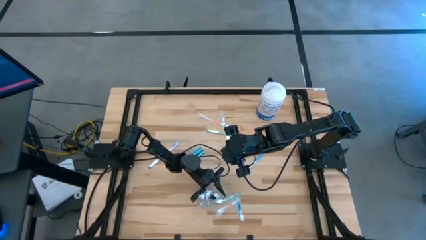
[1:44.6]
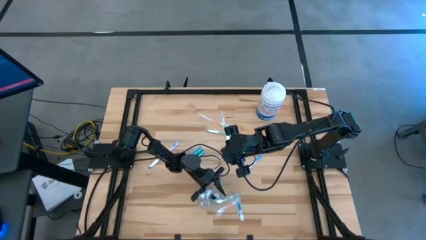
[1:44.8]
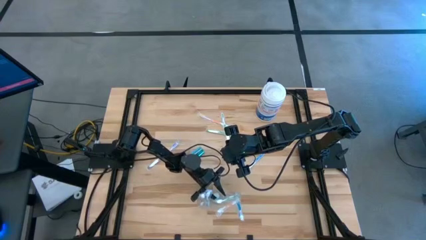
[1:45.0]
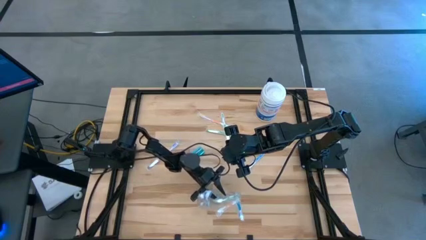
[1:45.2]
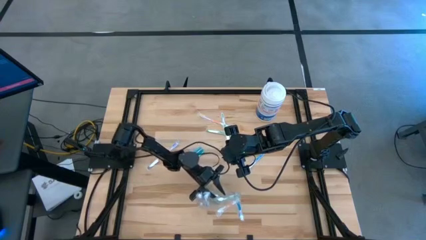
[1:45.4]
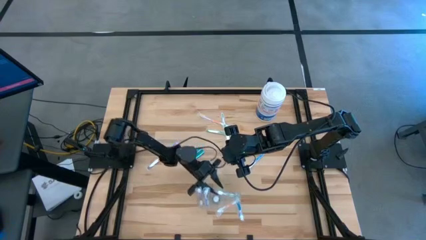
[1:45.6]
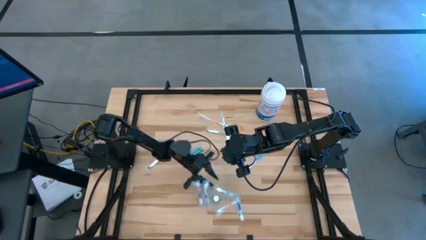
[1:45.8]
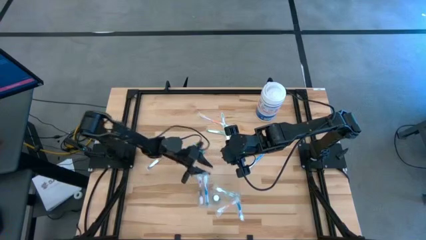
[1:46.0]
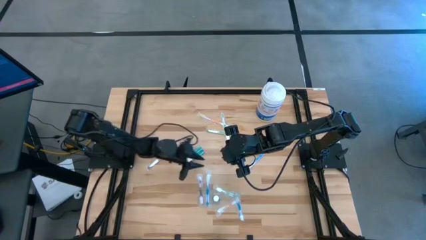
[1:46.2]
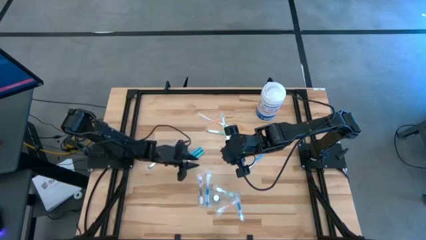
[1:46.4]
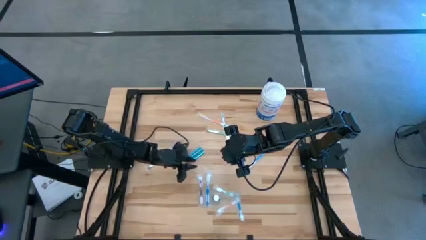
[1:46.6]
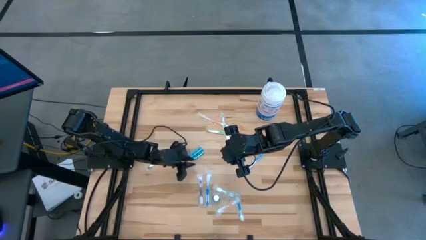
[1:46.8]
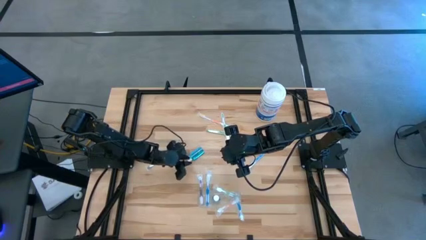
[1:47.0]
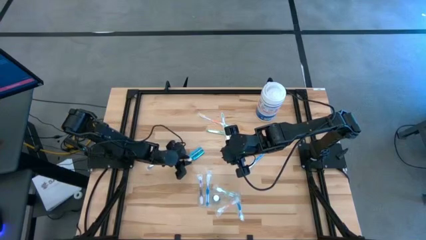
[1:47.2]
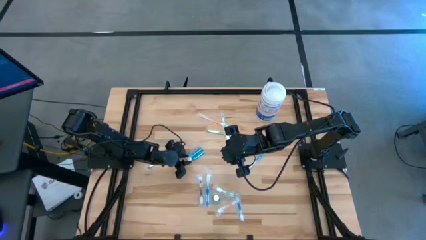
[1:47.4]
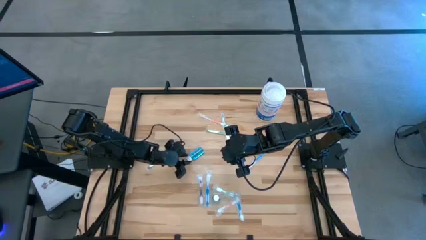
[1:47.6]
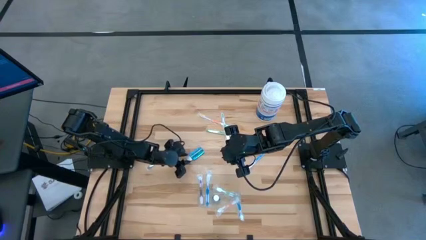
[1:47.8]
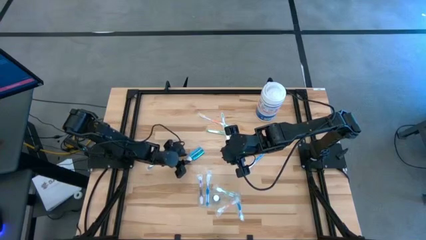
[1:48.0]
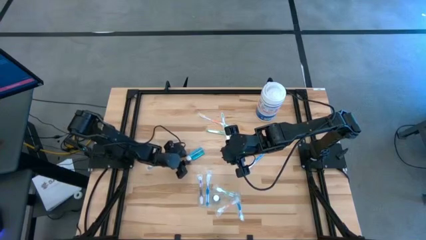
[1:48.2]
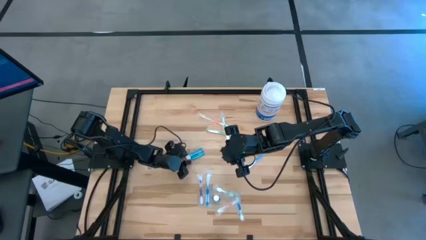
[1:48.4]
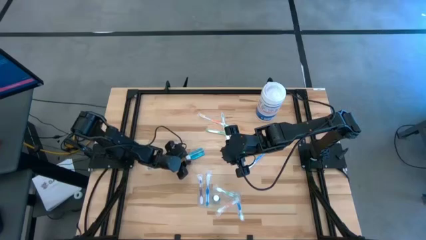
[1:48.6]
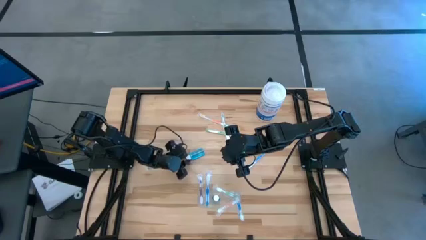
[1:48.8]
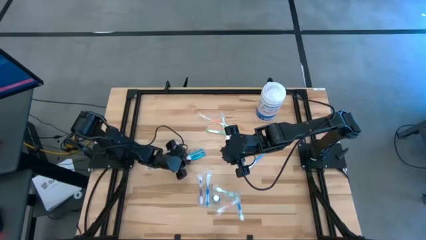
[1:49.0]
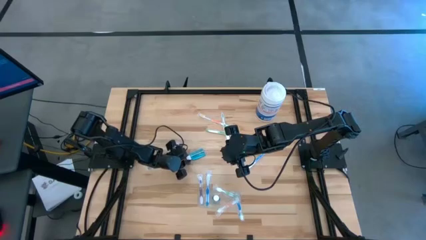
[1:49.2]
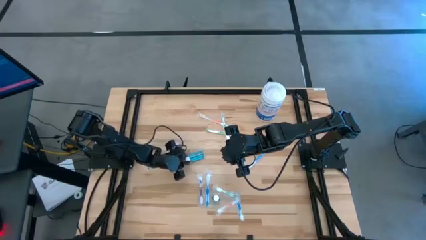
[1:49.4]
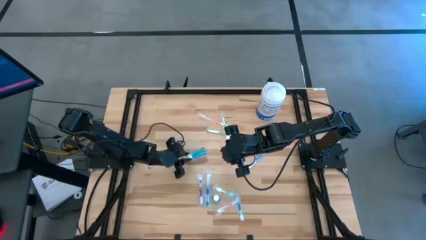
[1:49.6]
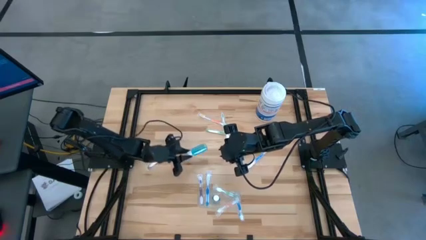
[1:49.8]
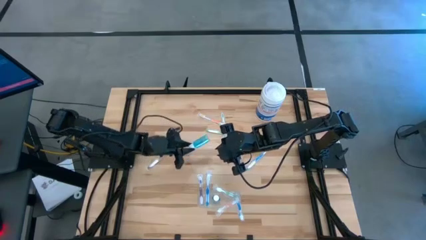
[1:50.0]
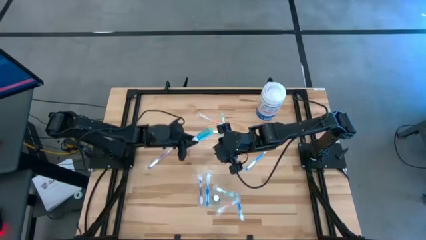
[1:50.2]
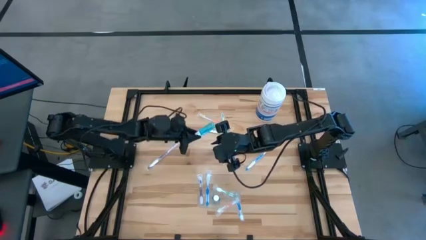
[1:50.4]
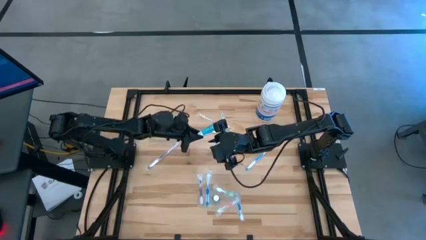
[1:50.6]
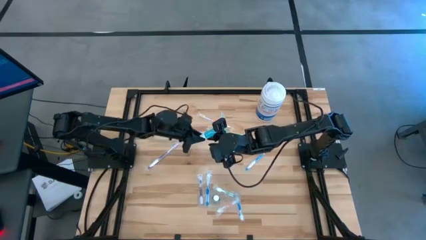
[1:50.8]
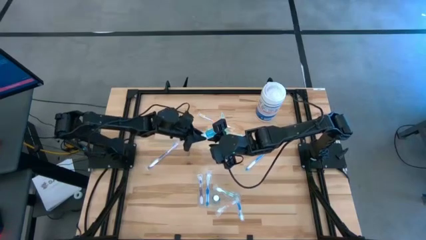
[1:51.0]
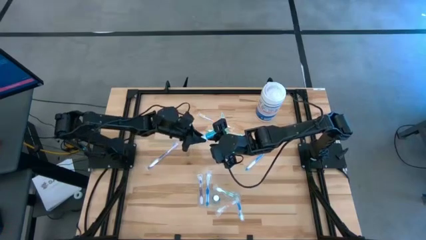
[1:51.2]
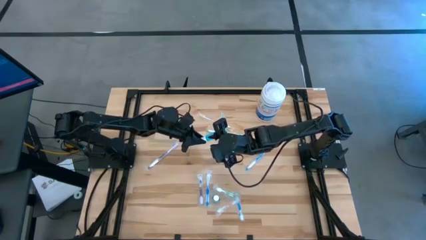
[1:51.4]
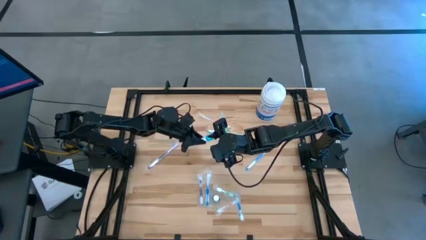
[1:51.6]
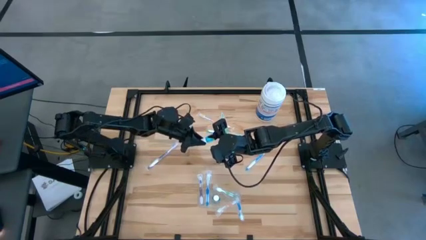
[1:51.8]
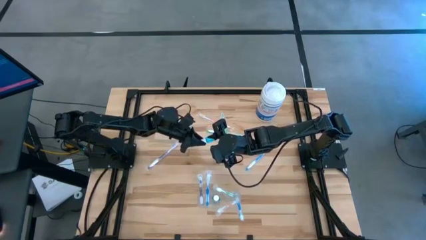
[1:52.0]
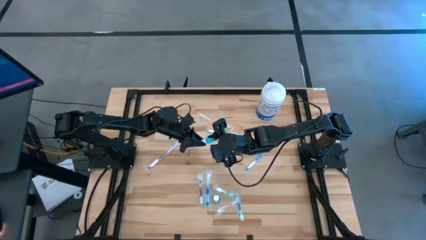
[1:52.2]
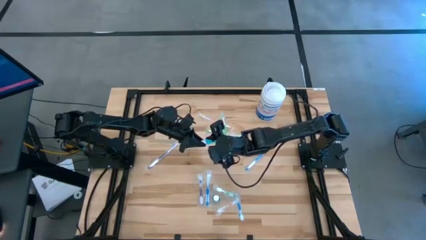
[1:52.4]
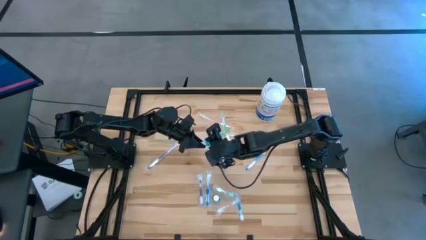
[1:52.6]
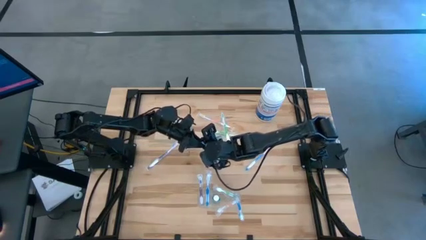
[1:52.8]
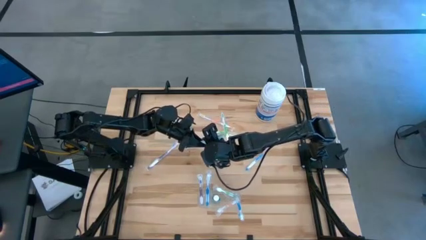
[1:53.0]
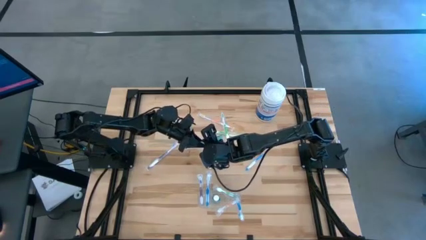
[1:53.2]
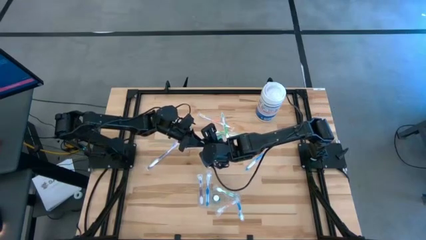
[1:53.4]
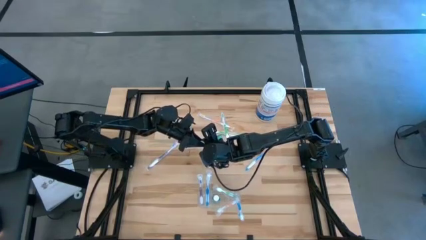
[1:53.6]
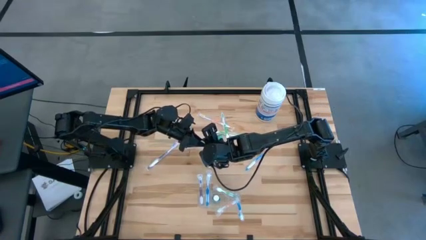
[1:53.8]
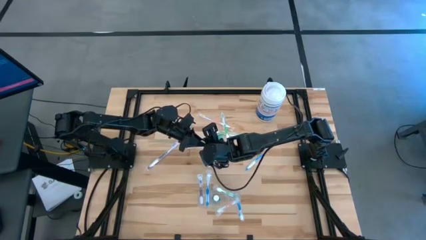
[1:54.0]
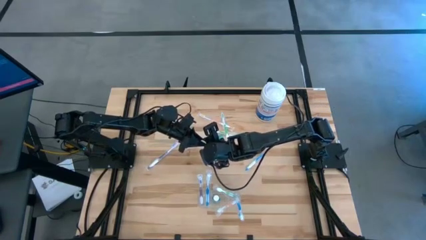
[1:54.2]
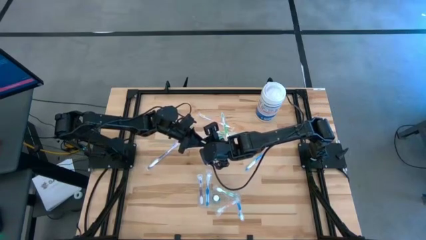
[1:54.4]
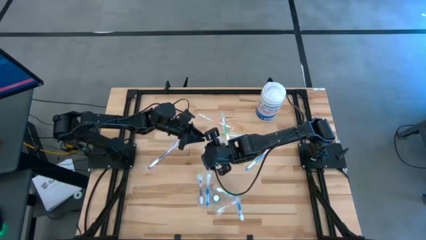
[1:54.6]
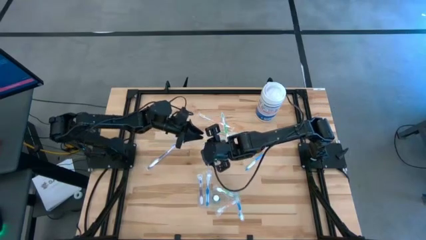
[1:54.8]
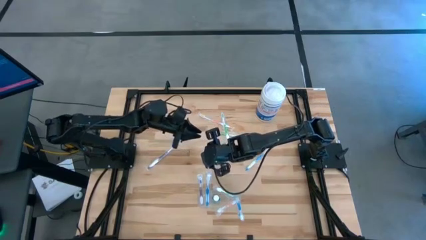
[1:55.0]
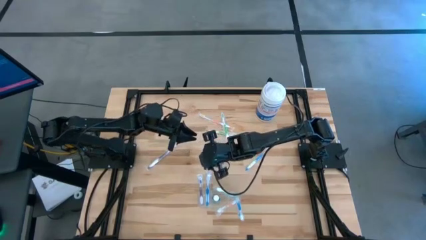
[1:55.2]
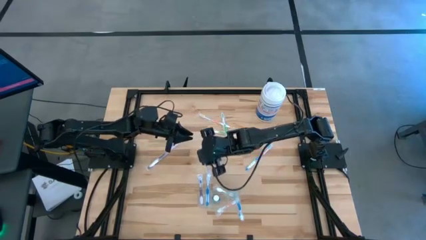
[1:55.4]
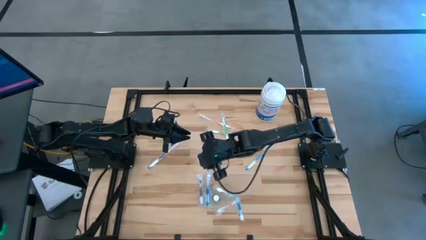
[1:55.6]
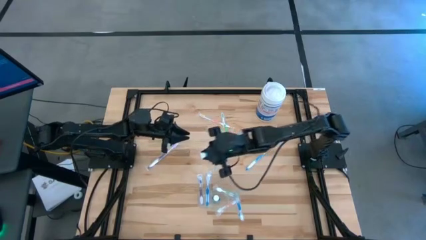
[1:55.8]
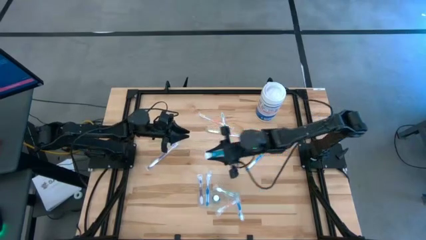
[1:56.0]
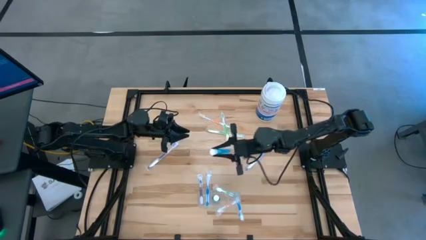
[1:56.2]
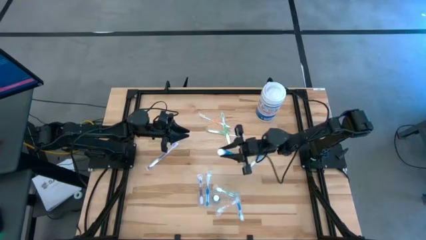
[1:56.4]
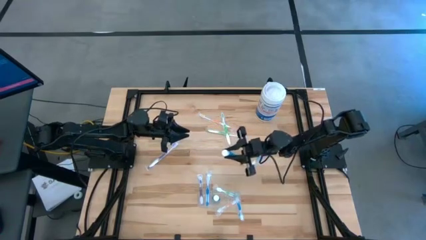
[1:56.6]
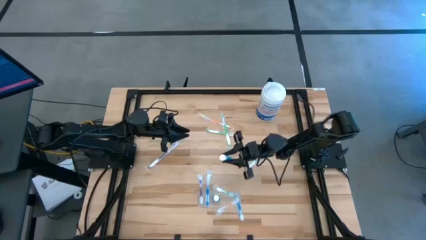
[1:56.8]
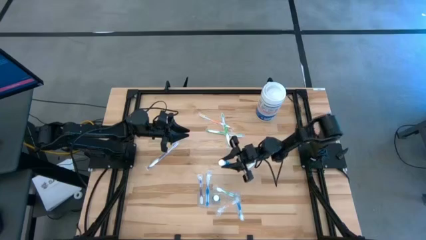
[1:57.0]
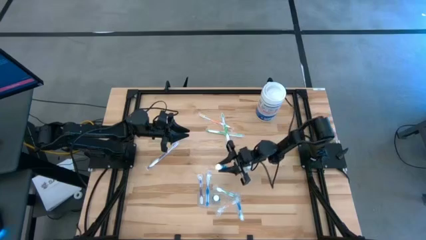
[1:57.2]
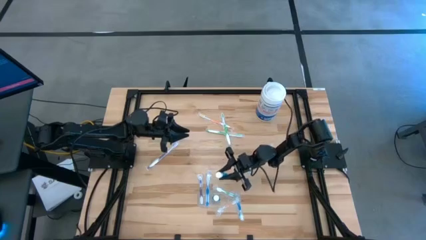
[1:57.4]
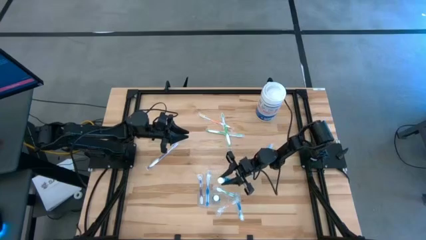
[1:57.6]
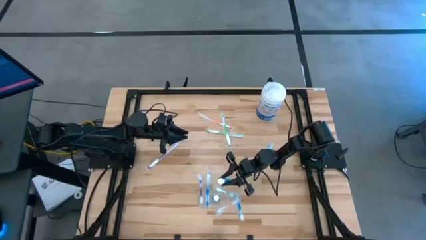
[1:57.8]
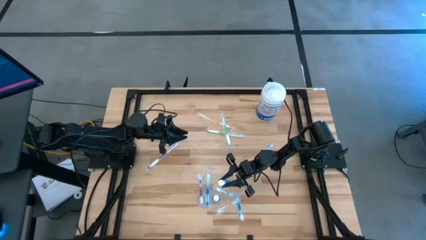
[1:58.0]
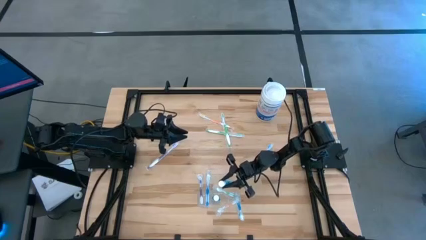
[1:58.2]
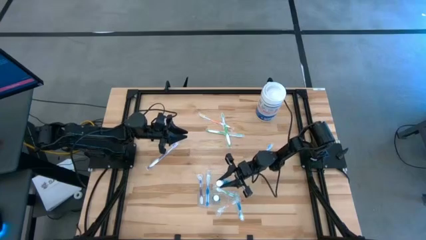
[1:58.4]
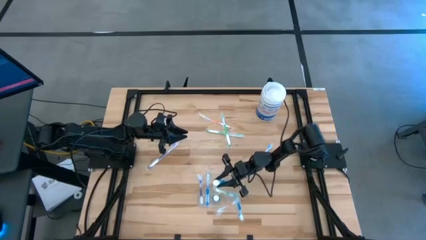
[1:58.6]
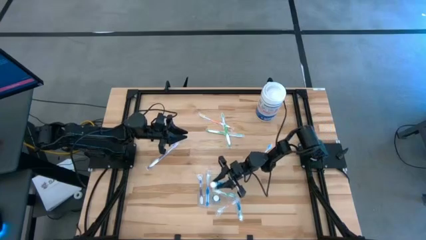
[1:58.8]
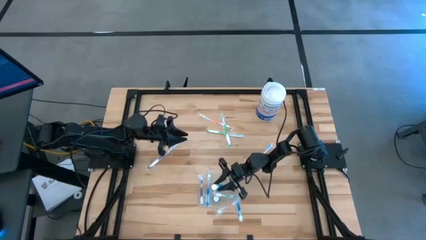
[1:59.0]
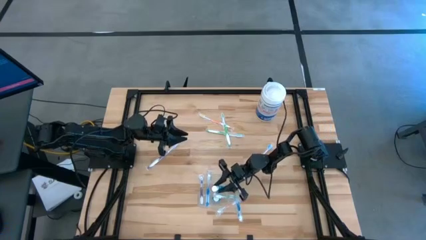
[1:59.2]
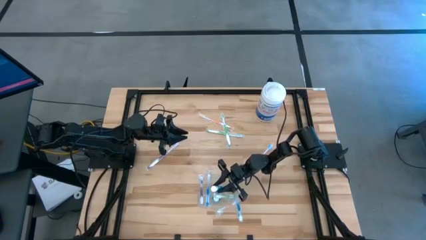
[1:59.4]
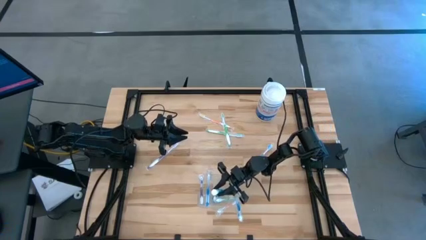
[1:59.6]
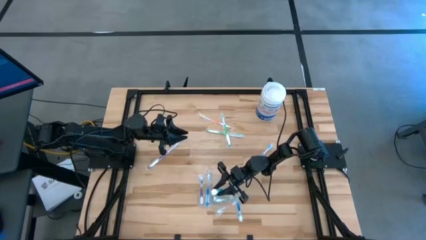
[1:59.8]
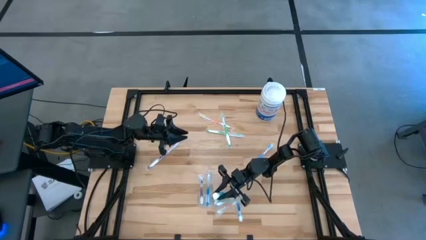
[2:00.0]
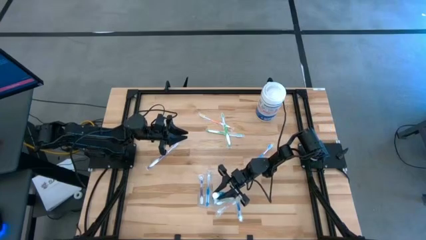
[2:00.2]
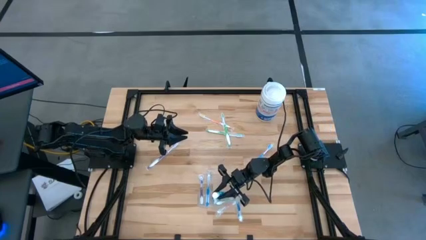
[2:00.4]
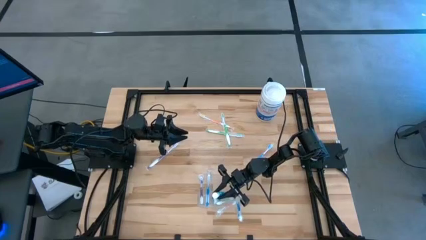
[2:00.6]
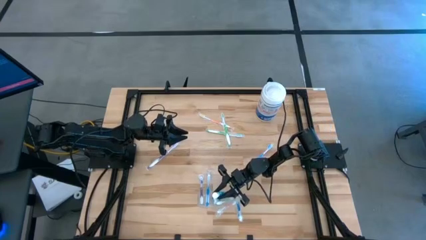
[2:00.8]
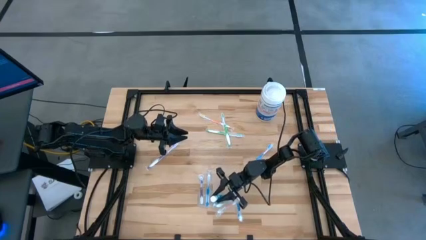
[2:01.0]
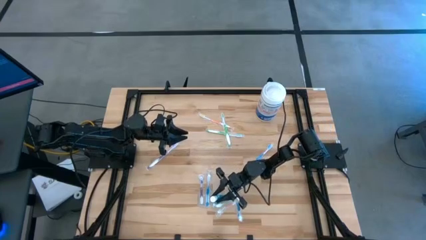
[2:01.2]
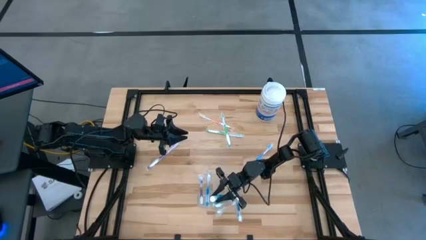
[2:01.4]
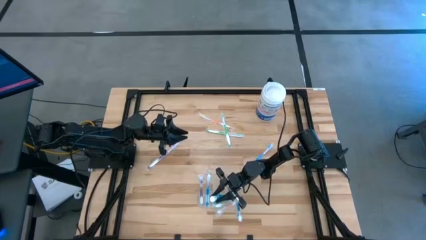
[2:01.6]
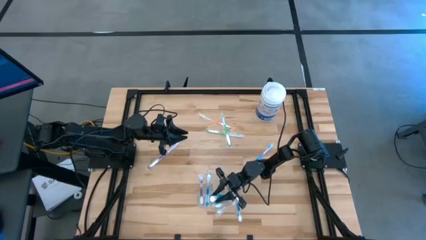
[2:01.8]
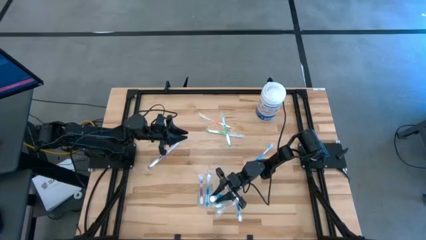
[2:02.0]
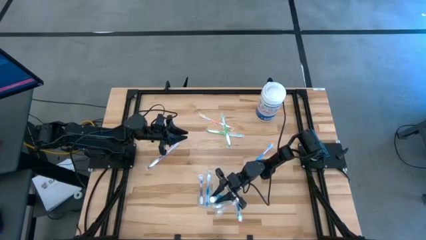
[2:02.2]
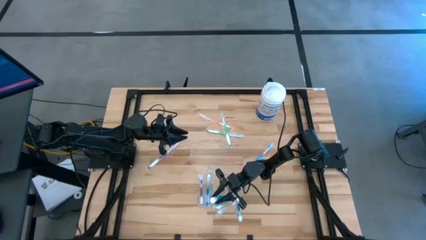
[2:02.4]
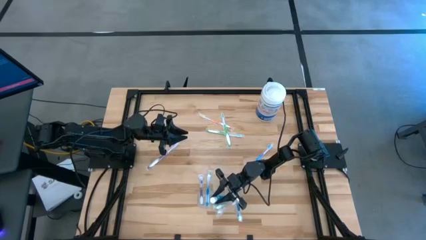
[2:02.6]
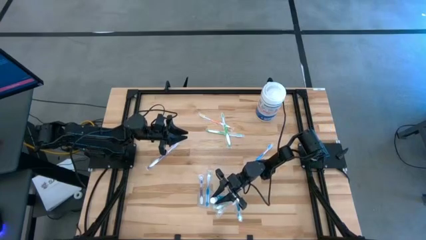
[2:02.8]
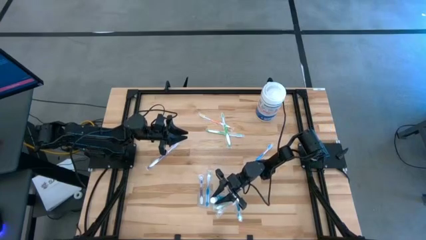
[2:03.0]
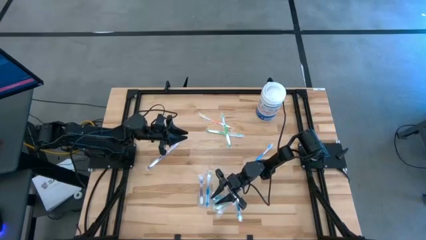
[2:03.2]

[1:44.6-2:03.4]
Task: Pick & Place toothbrushing station
Put the blue mouthwash bottle into the transparent organizer
